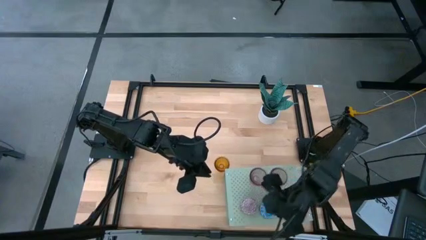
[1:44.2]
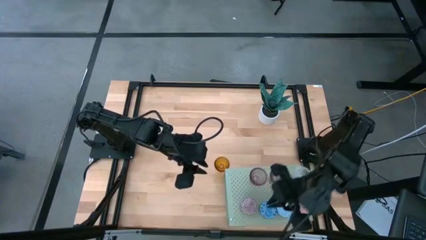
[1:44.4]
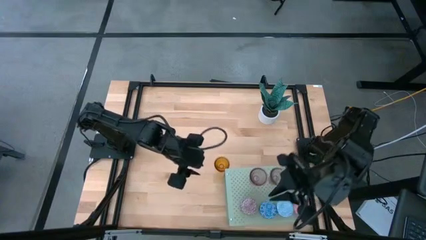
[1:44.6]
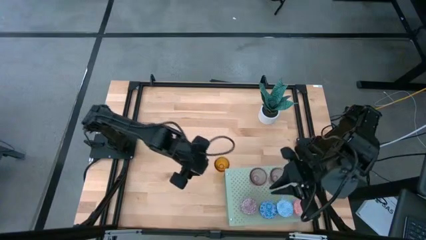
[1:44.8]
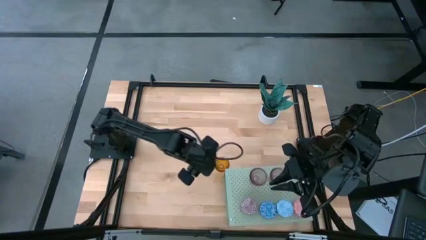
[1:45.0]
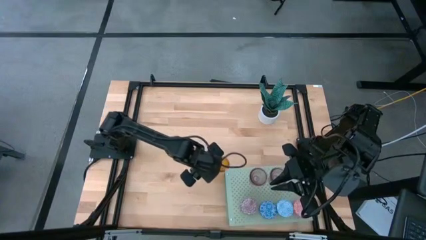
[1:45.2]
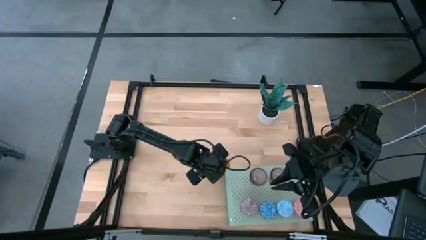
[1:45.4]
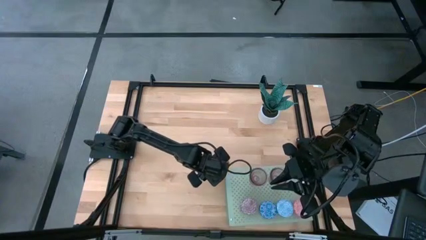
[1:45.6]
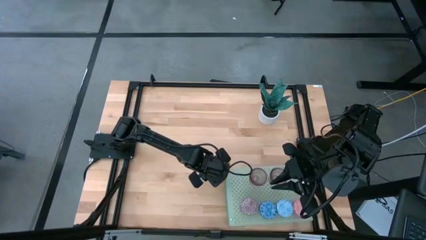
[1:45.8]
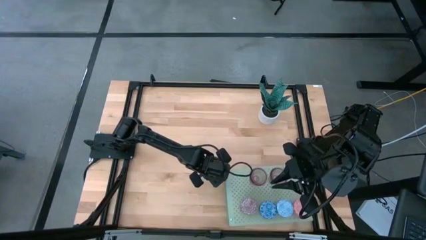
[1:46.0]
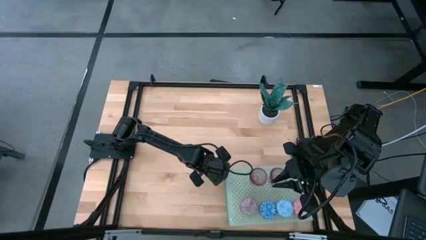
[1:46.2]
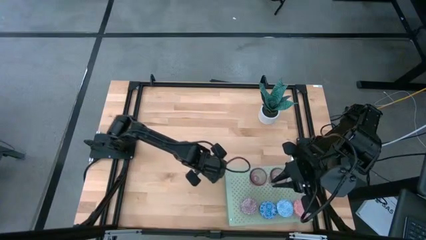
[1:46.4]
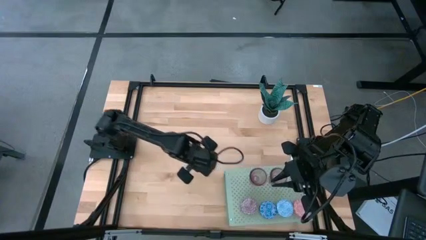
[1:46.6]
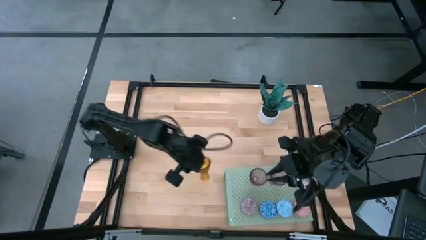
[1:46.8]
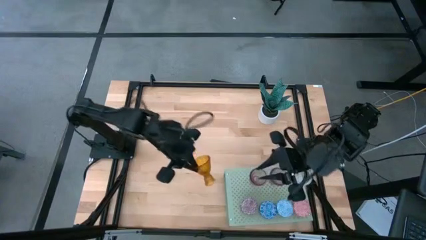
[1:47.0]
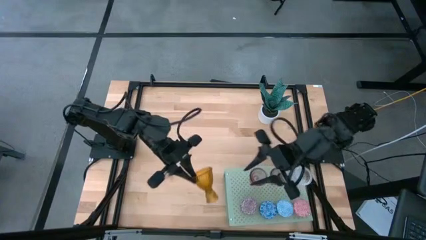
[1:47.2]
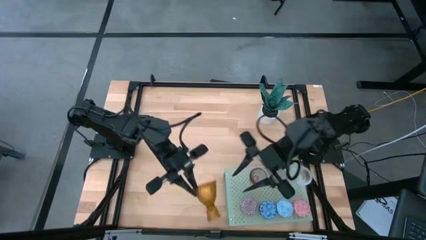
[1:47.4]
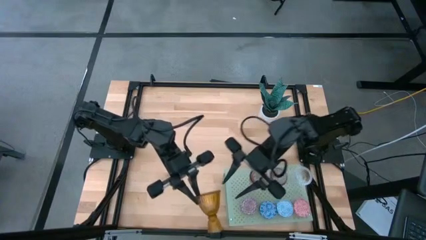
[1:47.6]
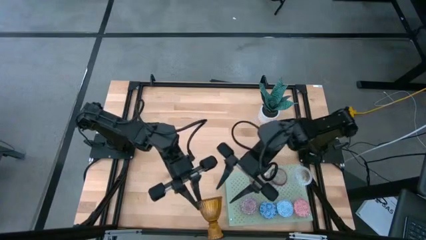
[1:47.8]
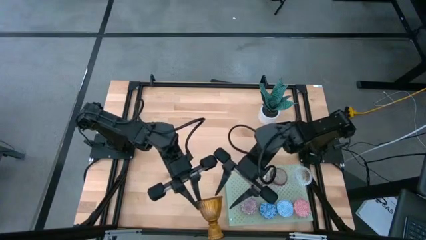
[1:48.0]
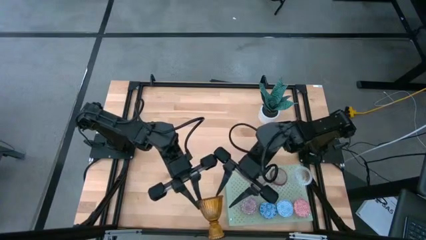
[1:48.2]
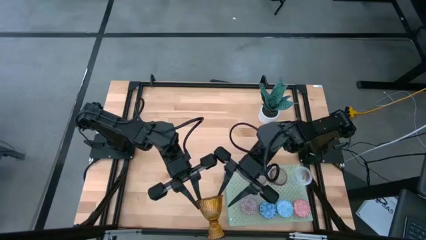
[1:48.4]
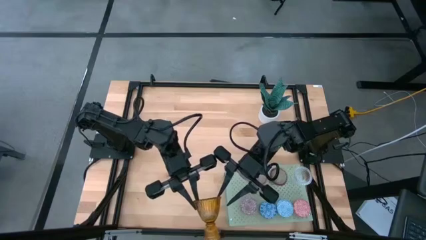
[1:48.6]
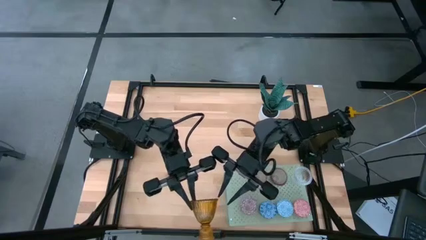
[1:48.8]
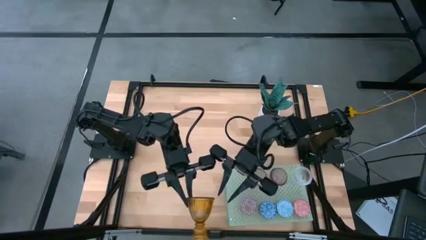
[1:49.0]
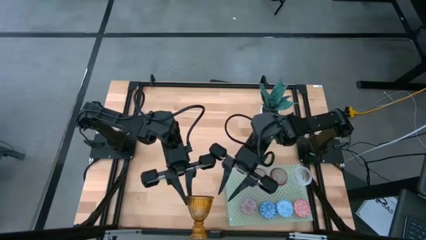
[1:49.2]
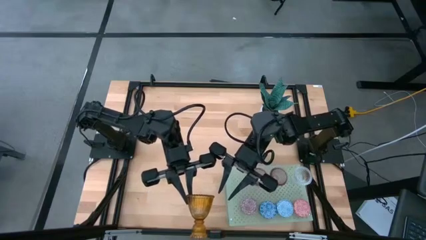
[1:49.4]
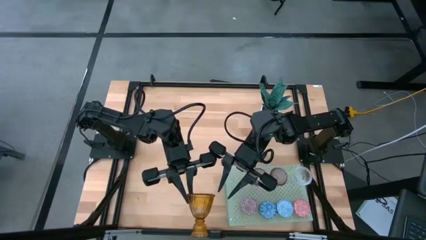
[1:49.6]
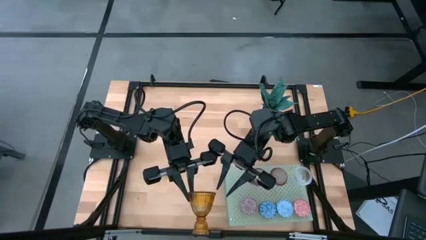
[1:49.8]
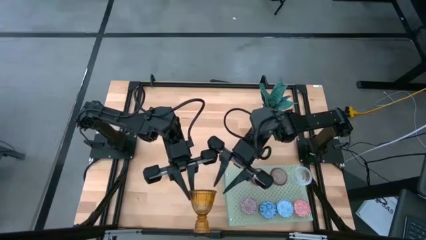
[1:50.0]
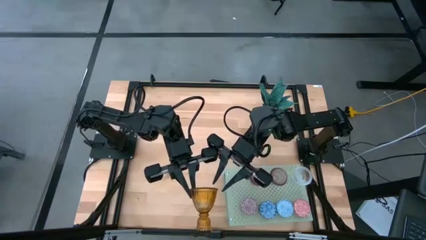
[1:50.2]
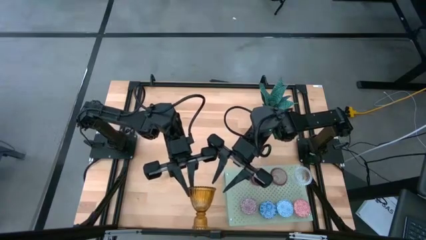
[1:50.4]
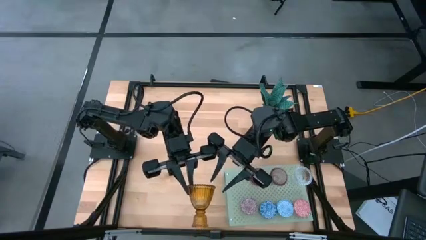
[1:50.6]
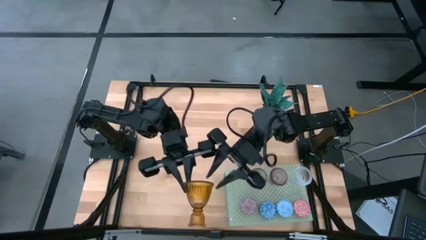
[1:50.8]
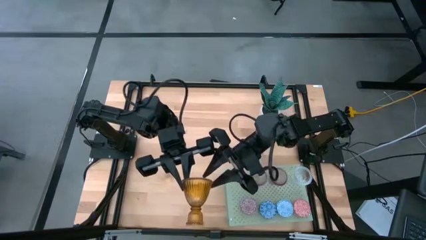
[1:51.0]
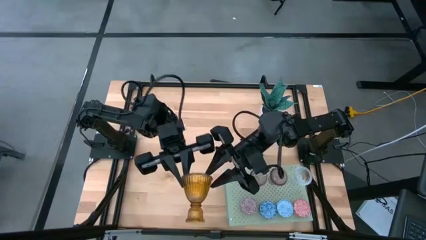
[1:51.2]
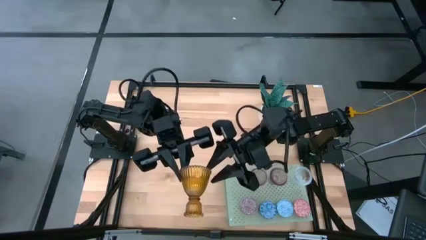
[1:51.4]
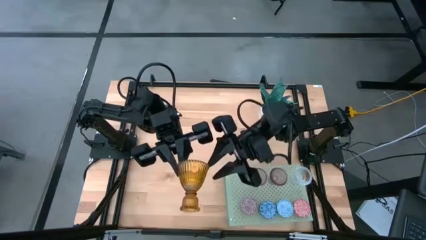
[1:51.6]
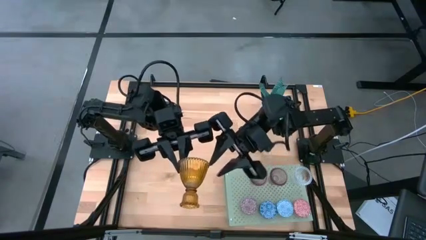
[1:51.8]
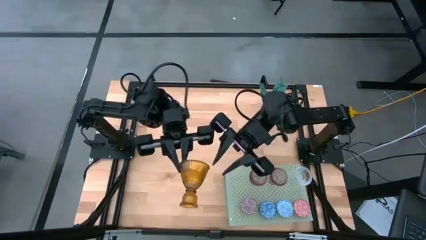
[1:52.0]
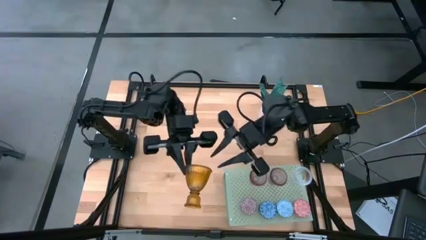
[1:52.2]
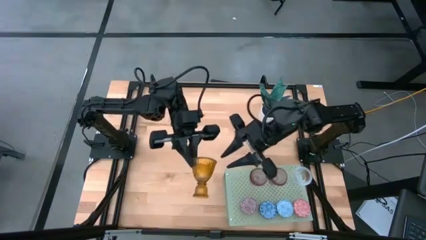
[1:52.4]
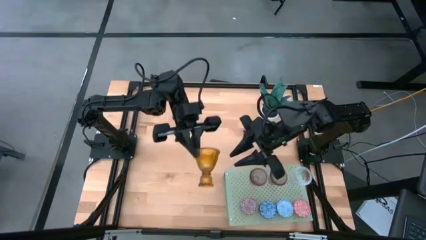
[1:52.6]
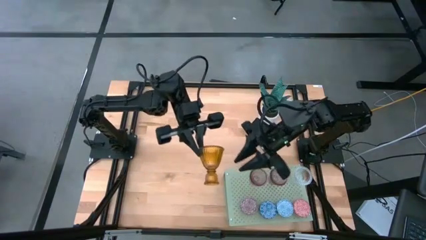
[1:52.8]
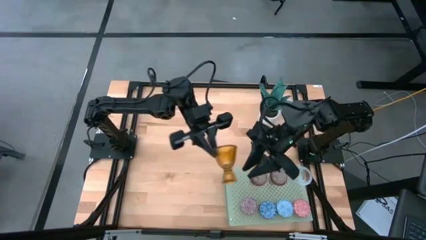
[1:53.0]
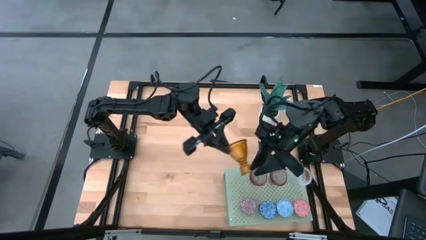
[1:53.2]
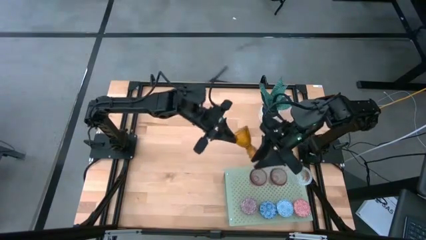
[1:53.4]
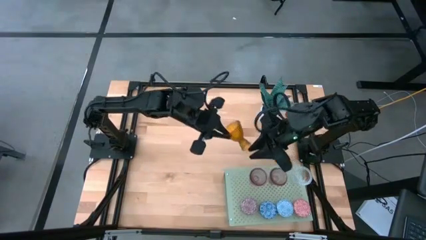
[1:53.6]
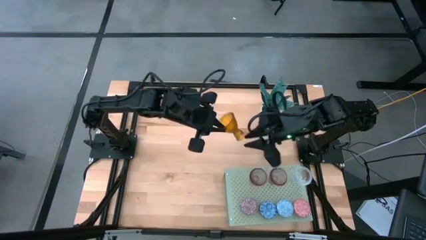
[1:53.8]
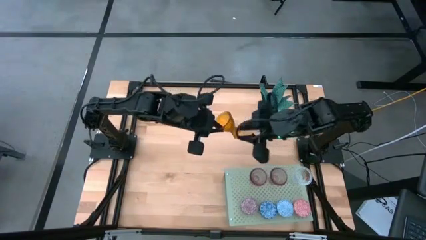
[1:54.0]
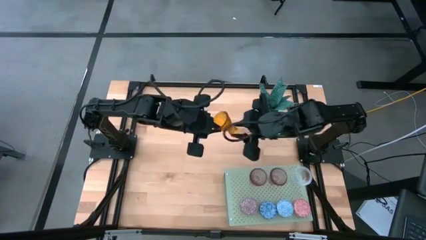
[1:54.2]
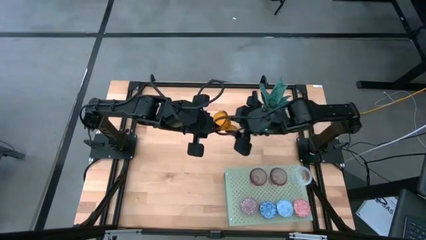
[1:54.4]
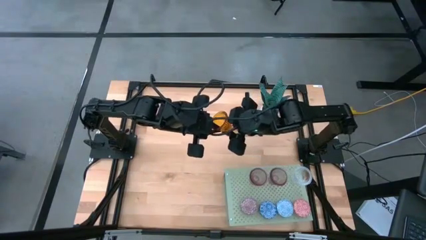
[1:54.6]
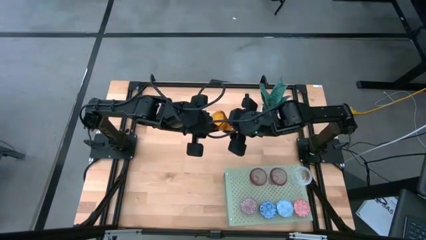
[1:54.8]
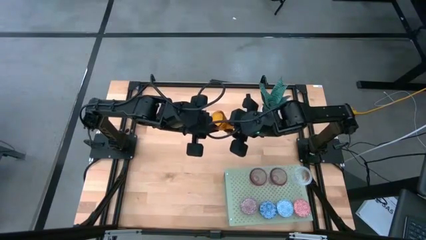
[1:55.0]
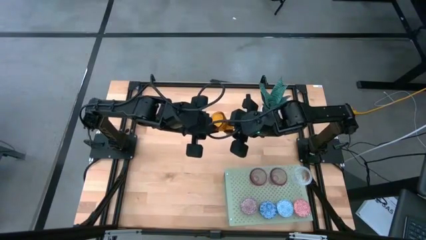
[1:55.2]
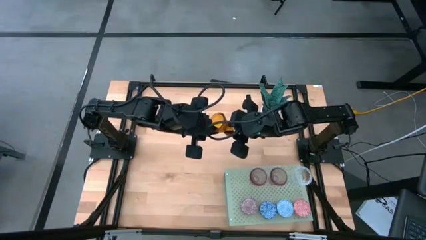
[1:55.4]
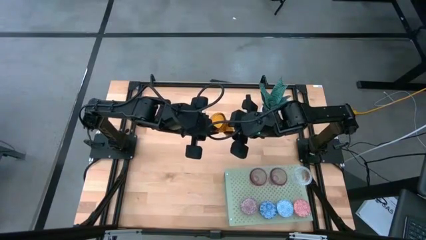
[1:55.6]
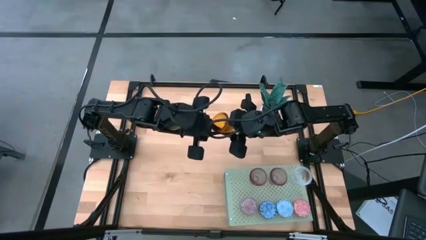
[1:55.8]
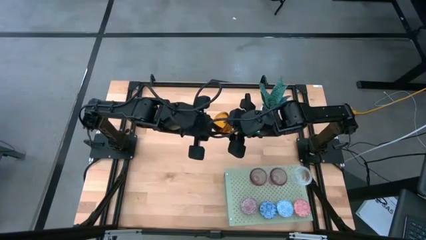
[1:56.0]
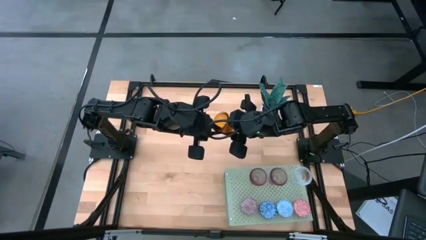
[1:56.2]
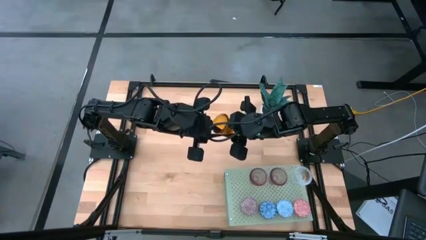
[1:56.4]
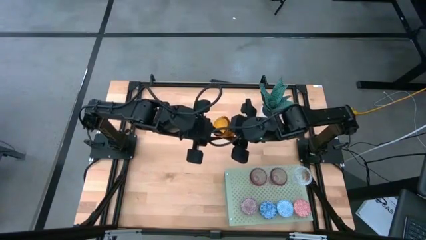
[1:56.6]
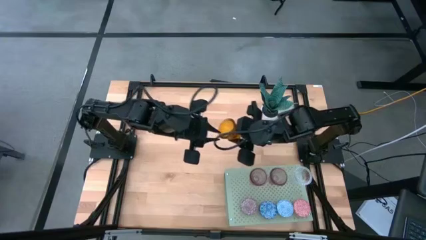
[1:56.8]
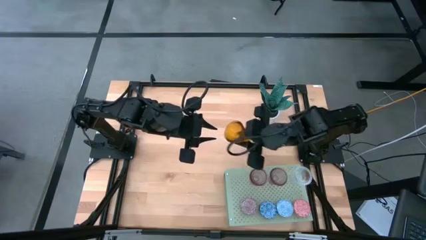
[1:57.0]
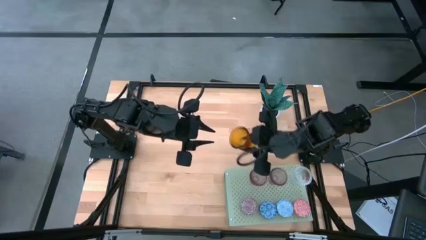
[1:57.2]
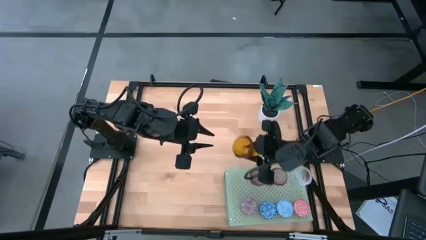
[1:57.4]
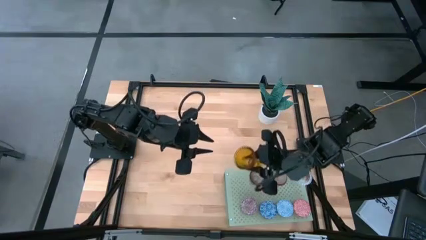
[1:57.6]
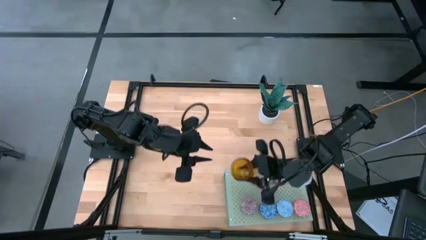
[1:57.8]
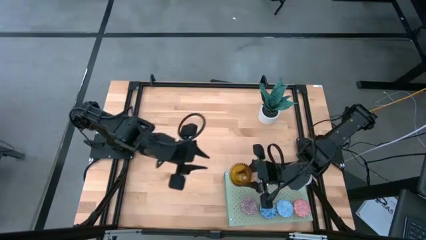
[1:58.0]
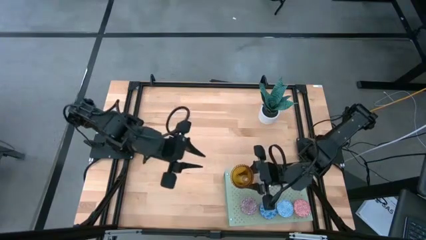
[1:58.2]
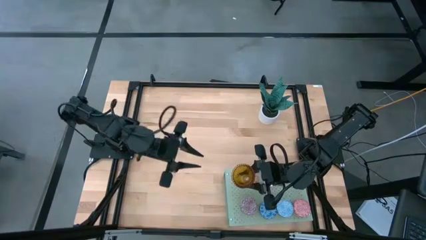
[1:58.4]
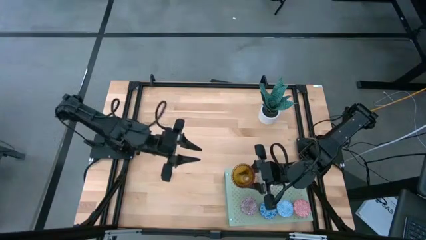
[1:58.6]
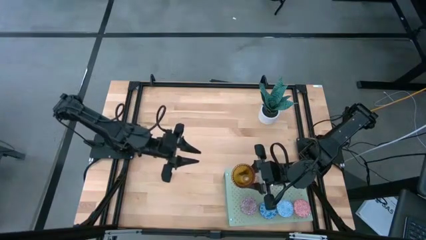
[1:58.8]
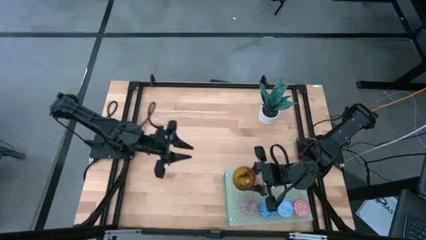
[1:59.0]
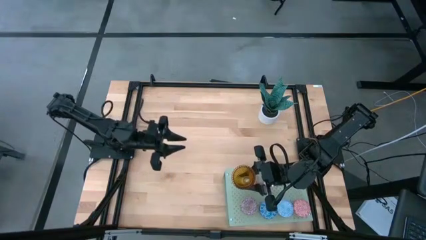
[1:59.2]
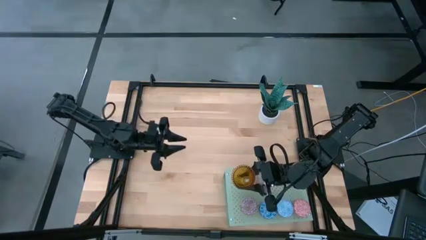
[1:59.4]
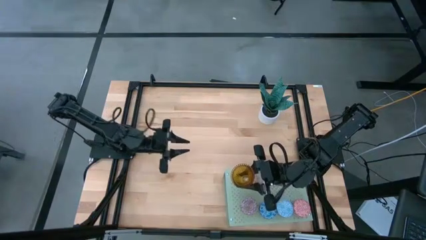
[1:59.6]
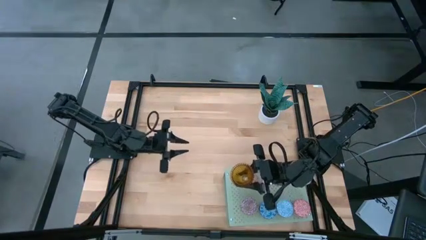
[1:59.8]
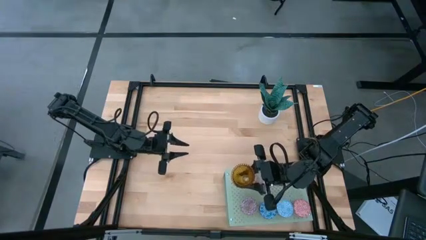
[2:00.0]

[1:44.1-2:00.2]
Task: Pick & Place candle stick holders
Put the brown glass candle holder on the shelf

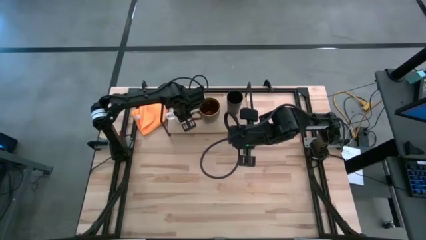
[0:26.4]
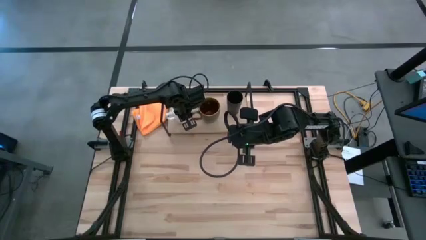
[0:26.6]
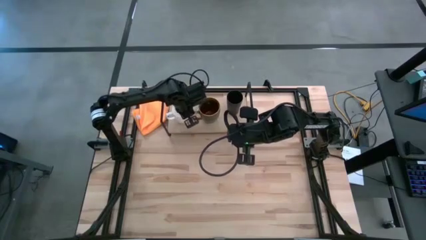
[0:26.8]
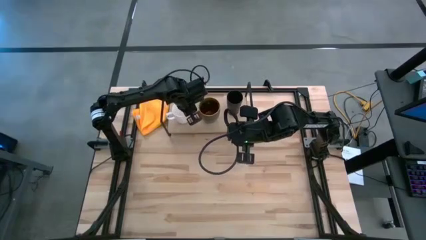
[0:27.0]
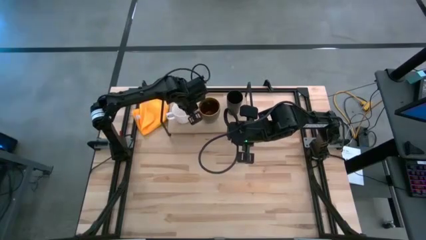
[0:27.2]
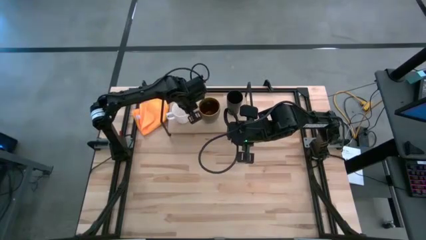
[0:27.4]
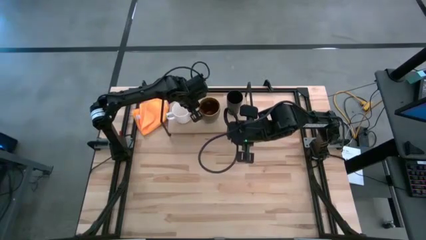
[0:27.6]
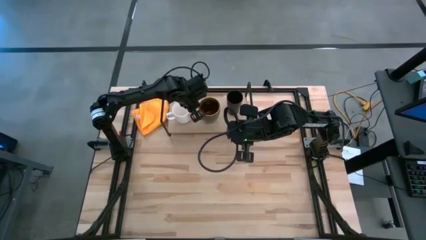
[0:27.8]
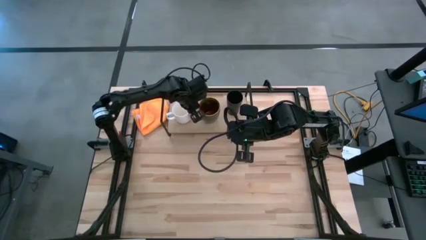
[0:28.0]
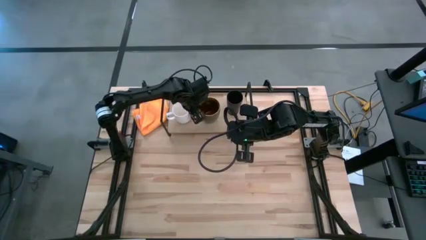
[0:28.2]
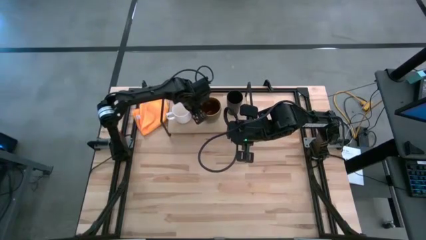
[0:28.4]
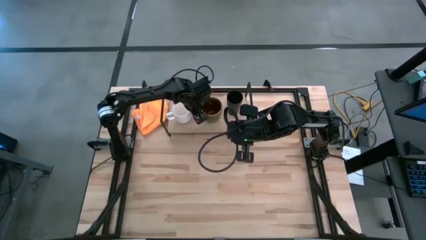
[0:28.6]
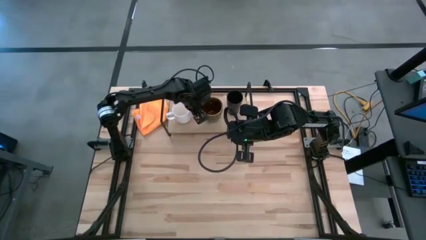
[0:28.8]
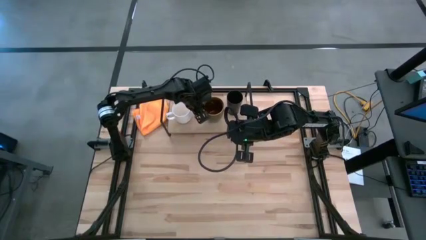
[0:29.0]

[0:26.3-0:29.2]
Task: Stack small to large cups/mugs on shelf
Adjust the brown mug on the shelf
